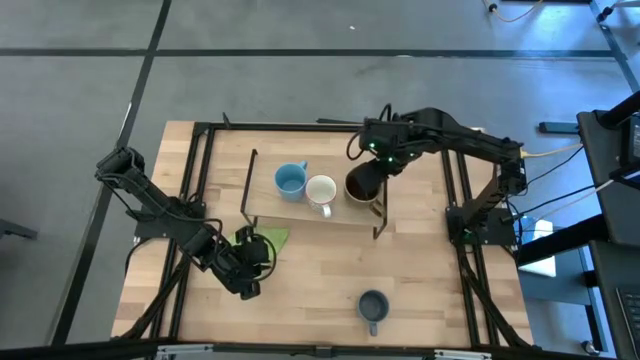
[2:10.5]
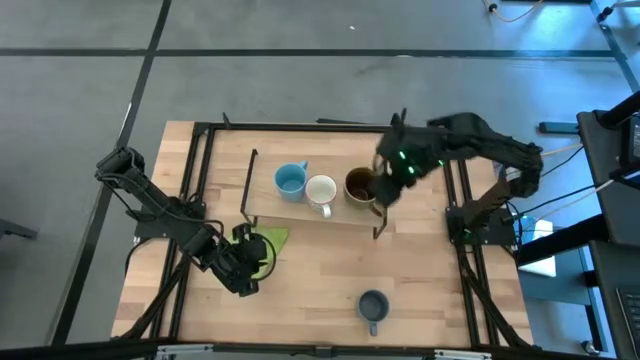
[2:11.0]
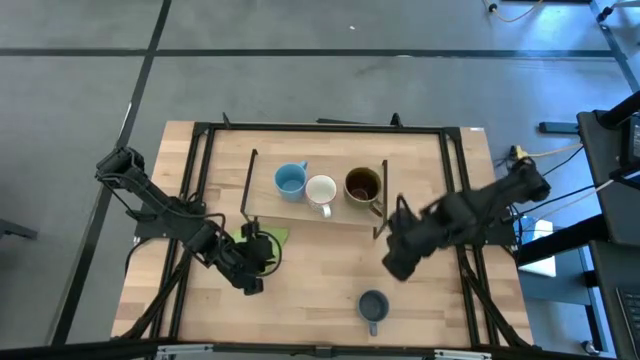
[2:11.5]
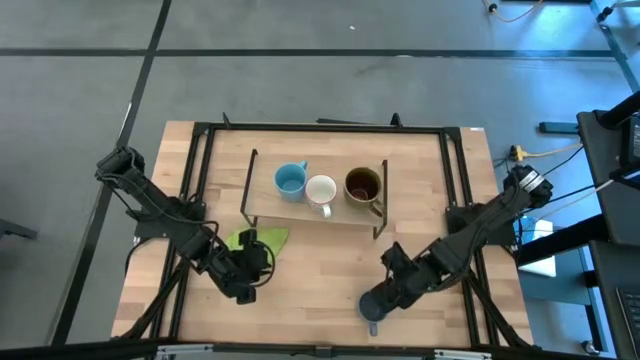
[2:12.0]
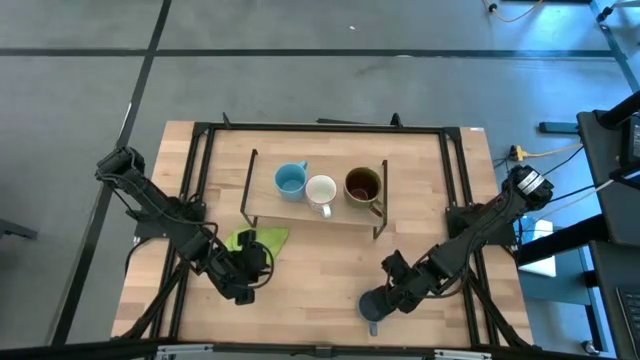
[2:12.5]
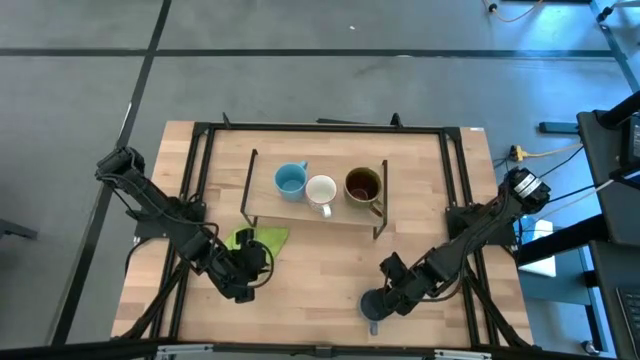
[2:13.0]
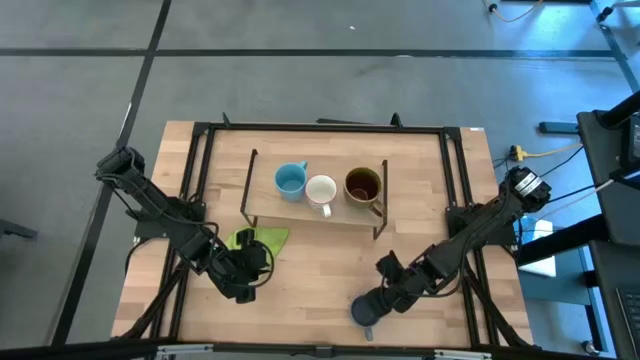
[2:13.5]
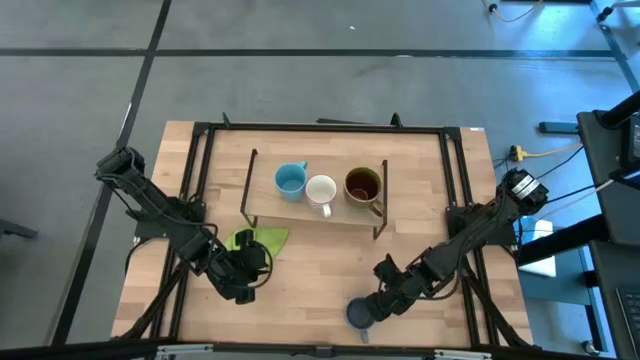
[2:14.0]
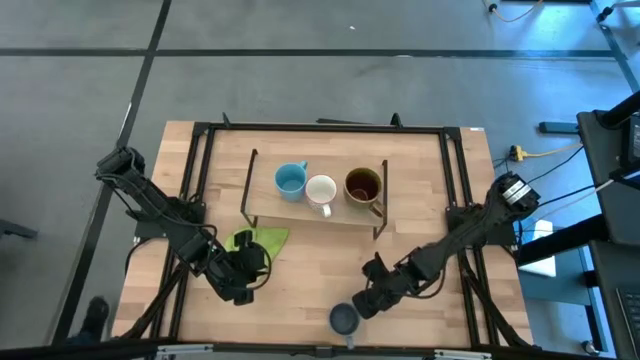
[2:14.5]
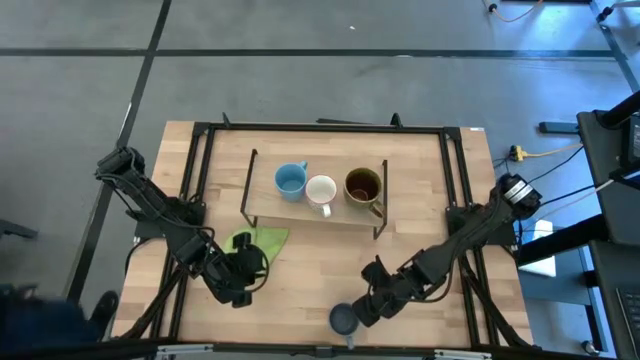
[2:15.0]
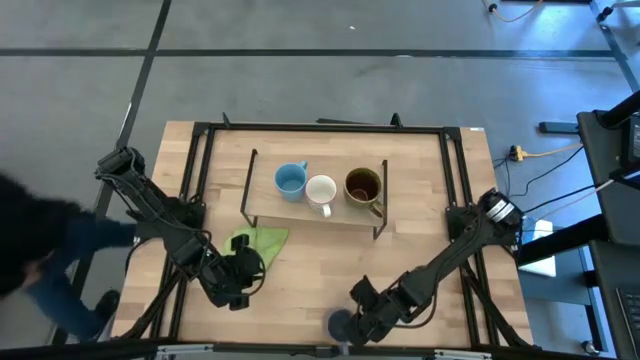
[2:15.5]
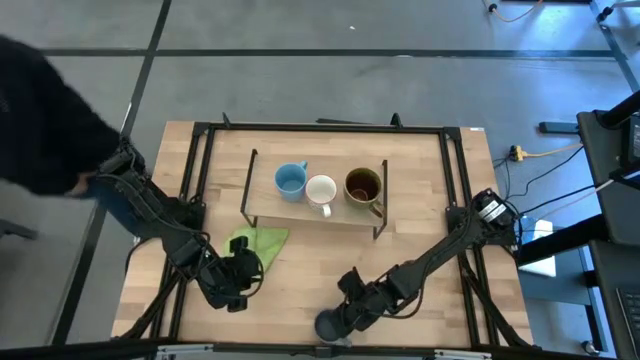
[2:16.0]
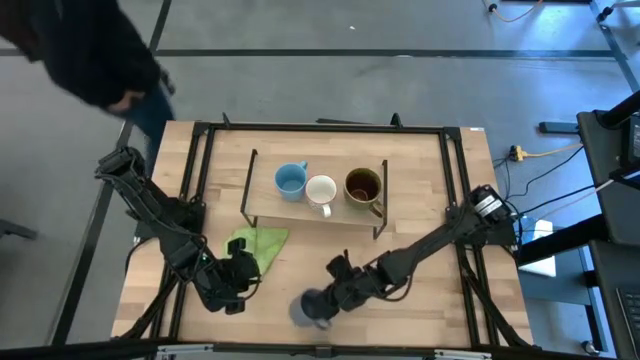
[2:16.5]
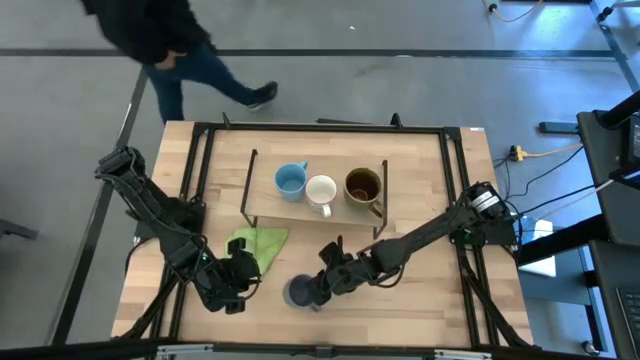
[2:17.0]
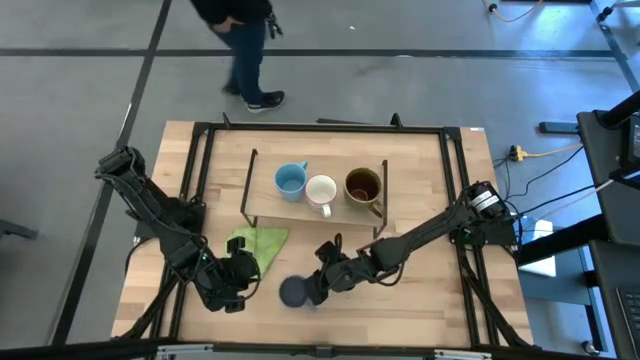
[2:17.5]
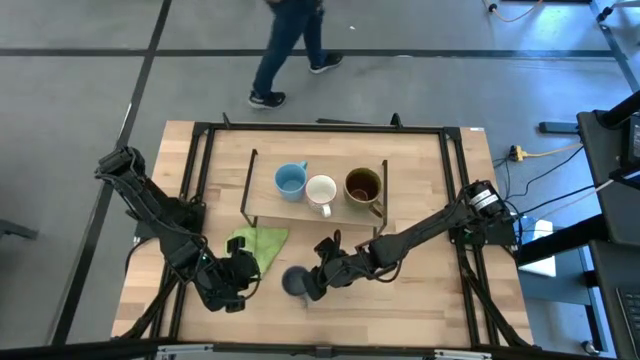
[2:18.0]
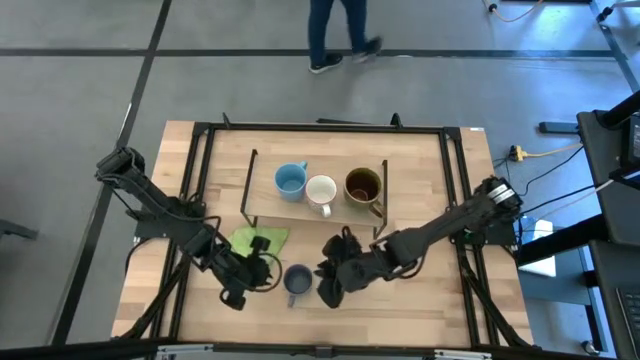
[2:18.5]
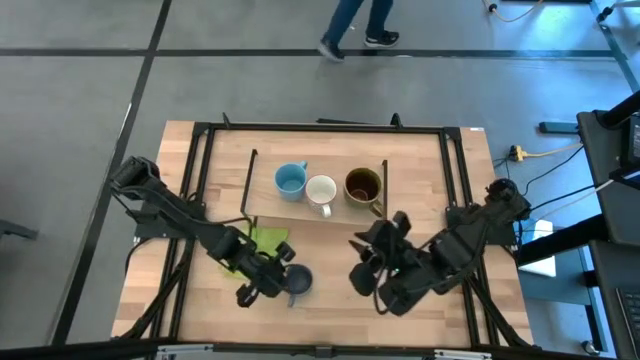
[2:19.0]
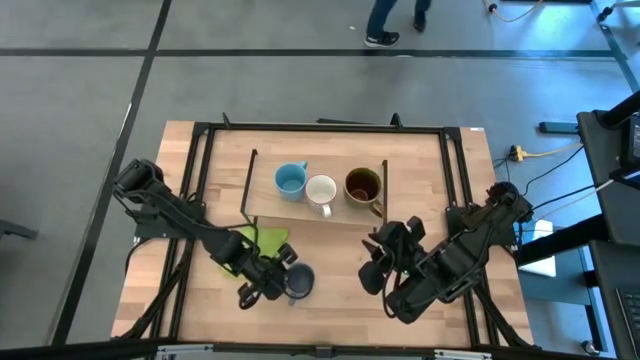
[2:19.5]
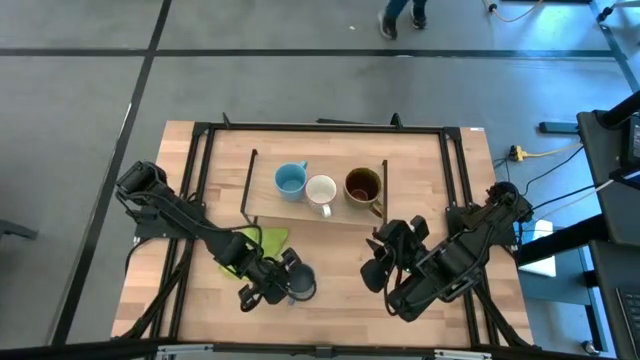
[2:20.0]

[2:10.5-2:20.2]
Task: Stack small to large cups/mugs on shelf
Put the gray mug on the shelf

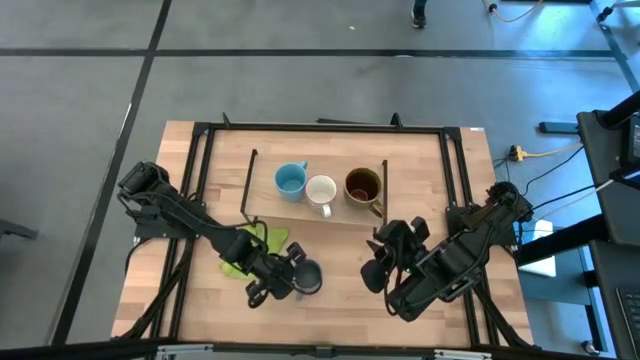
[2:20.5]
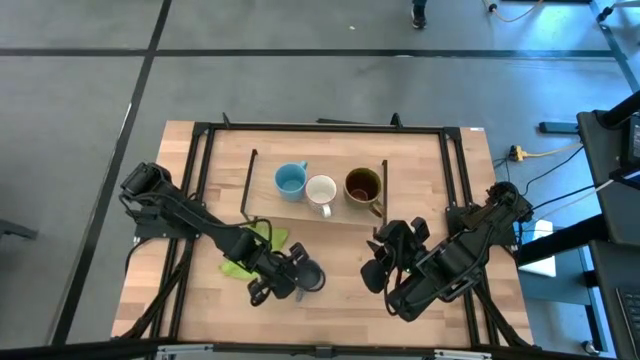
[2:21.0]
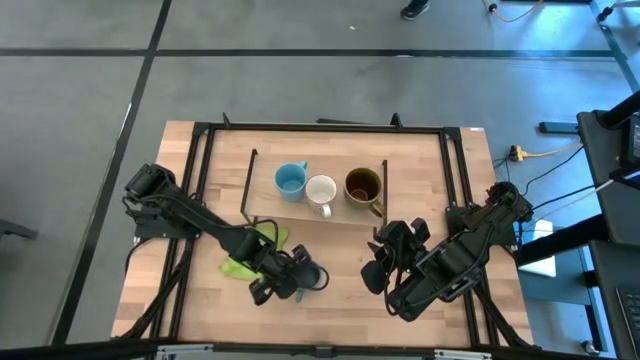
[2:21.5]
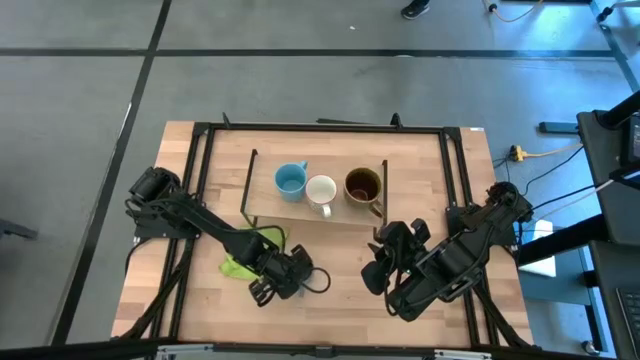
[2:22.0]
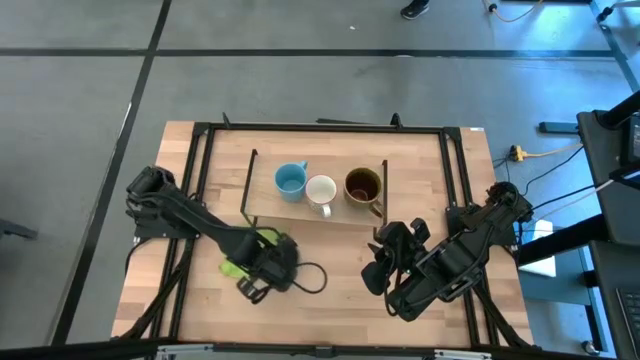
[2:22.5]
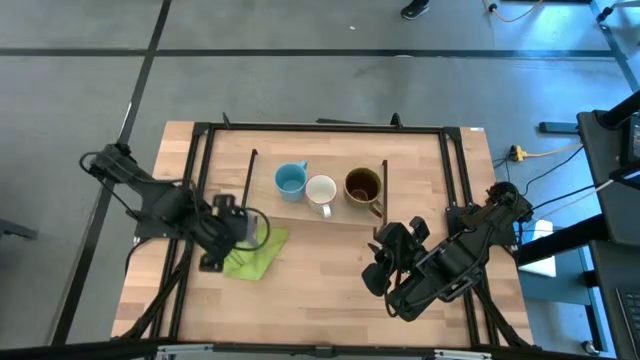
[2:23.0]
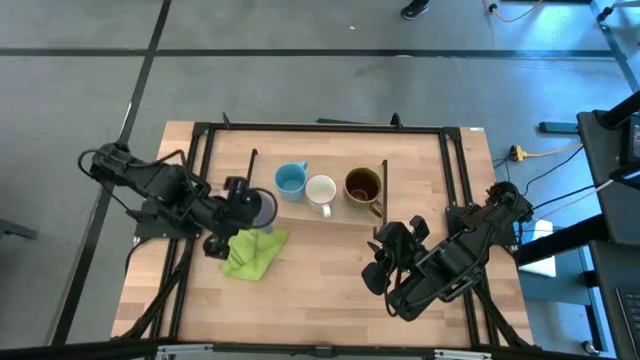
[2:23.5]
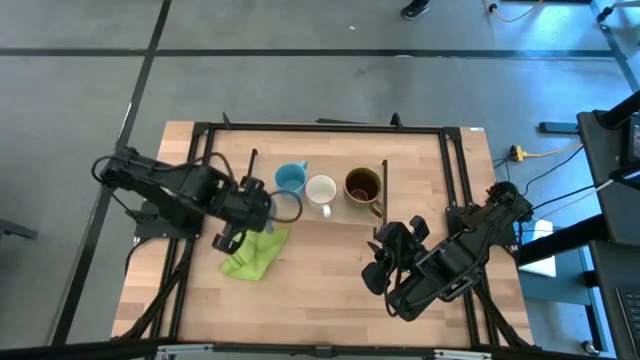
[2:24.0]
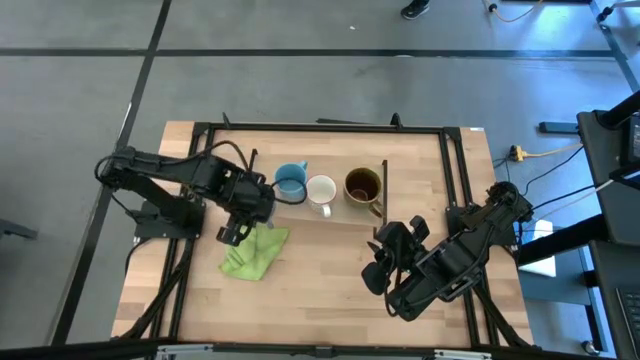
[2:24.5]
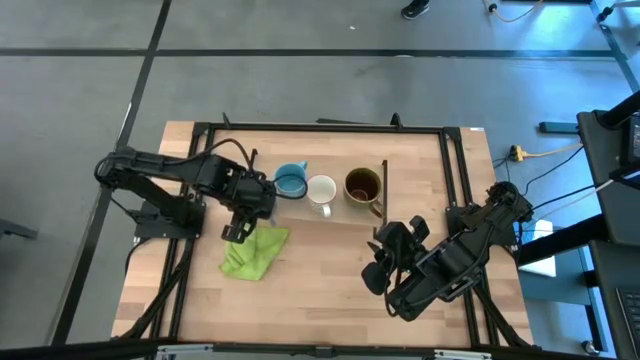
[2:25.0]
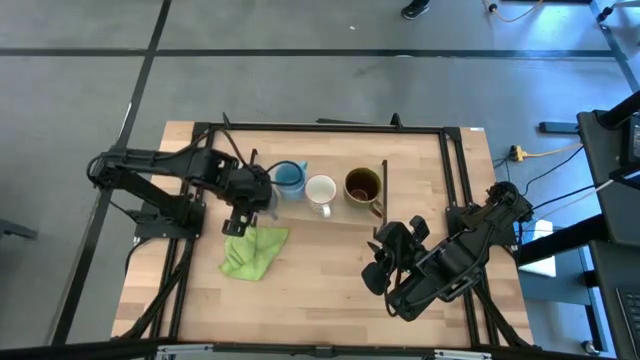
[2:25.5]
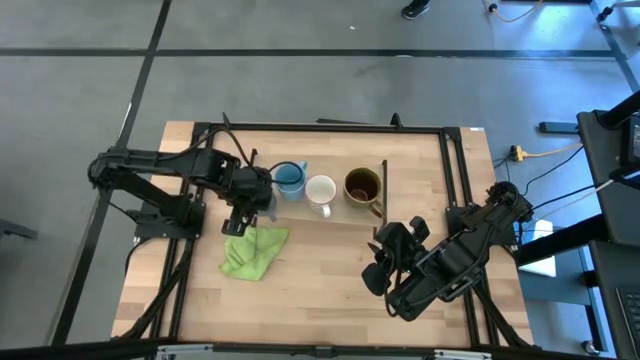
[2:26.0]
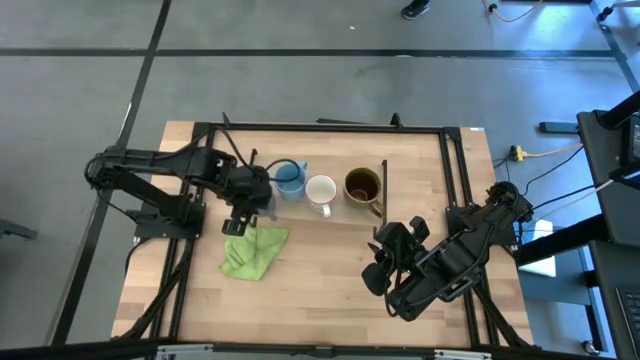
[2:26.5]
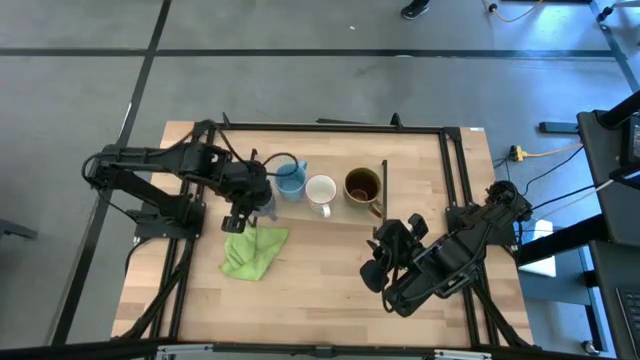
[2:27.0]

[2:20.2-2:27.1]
Put the gray mug on the shelf
